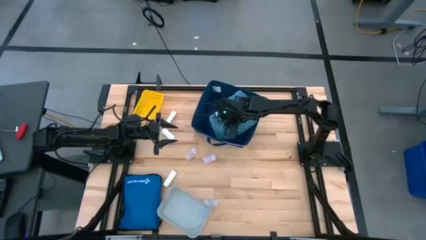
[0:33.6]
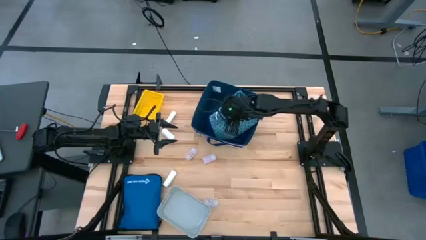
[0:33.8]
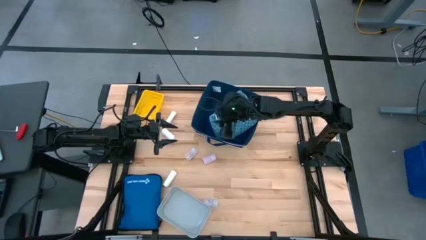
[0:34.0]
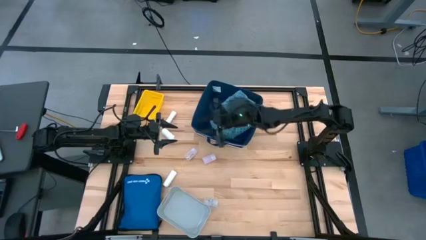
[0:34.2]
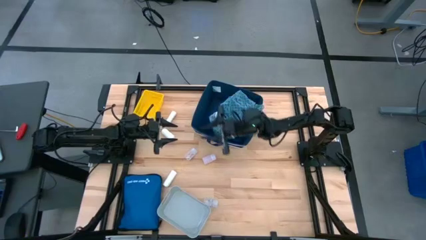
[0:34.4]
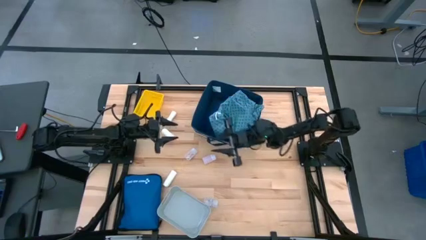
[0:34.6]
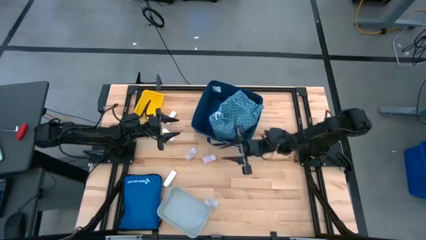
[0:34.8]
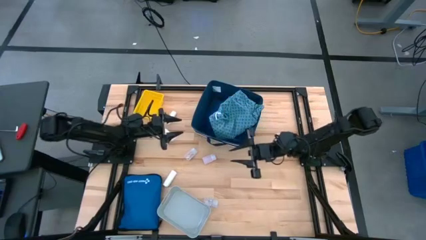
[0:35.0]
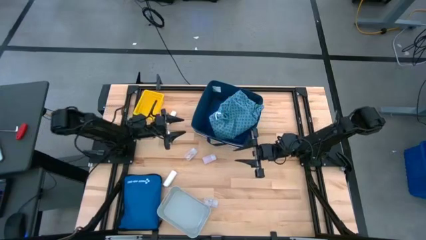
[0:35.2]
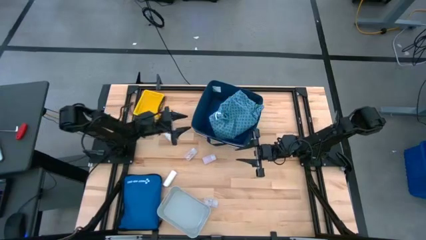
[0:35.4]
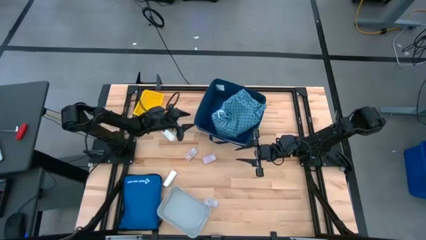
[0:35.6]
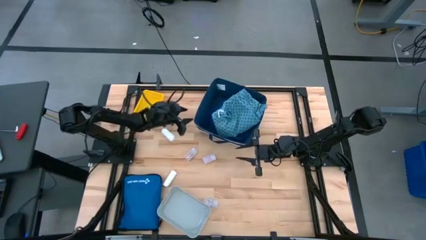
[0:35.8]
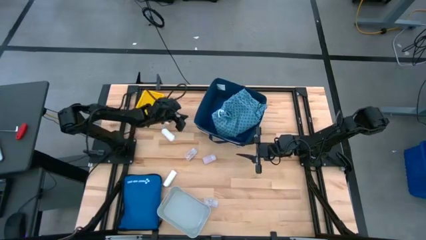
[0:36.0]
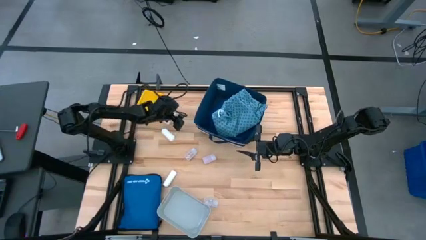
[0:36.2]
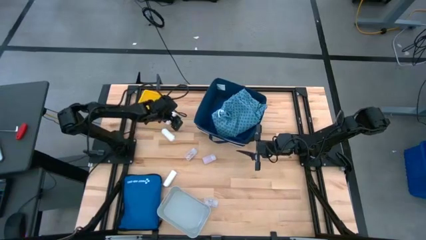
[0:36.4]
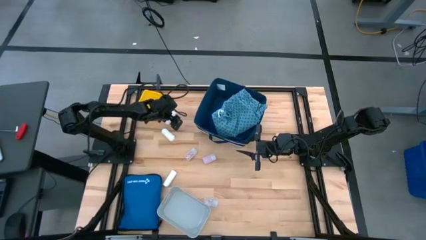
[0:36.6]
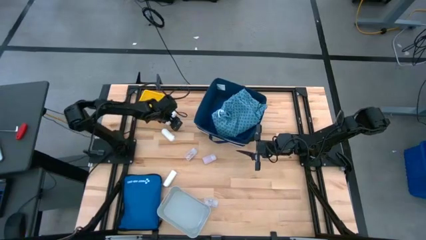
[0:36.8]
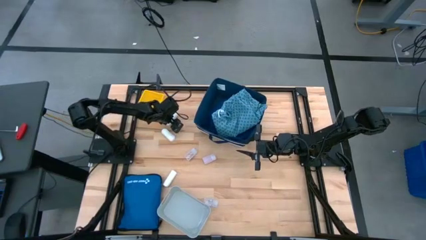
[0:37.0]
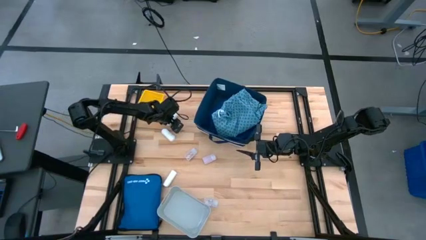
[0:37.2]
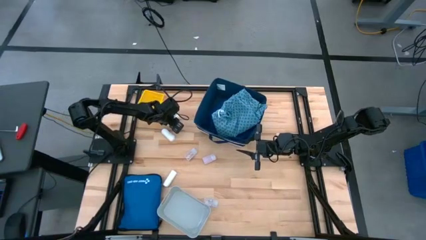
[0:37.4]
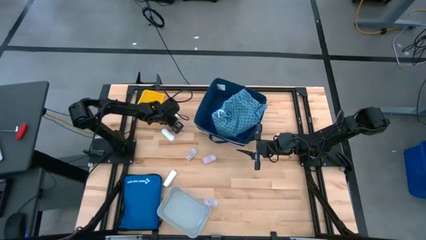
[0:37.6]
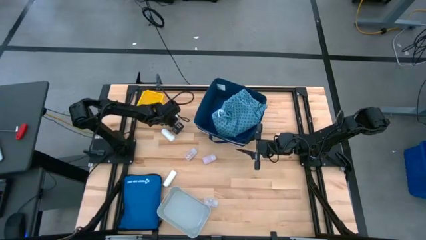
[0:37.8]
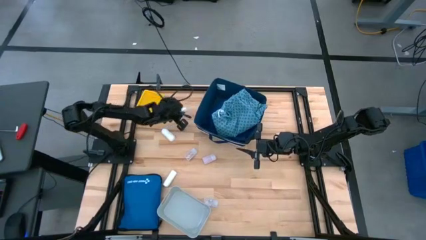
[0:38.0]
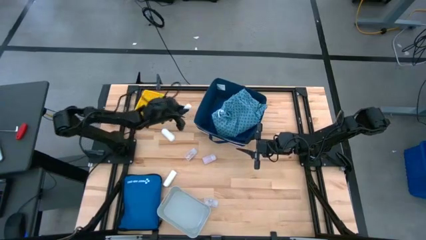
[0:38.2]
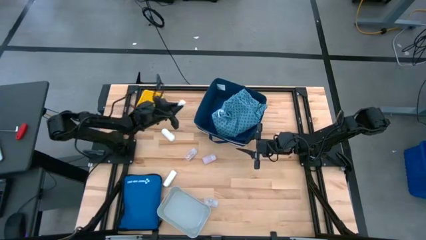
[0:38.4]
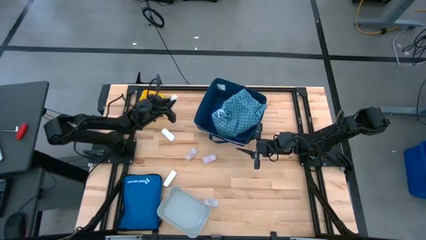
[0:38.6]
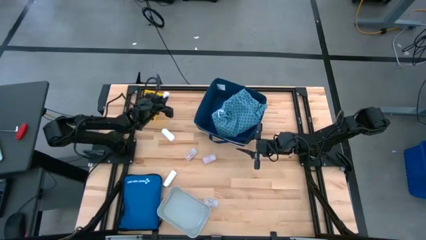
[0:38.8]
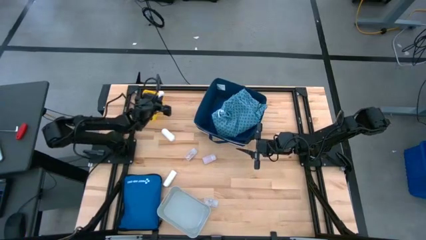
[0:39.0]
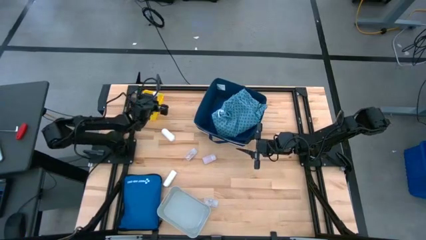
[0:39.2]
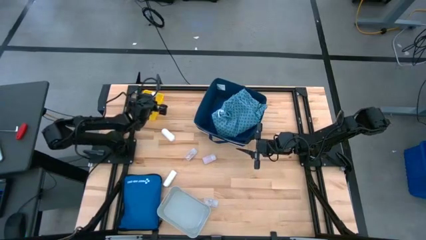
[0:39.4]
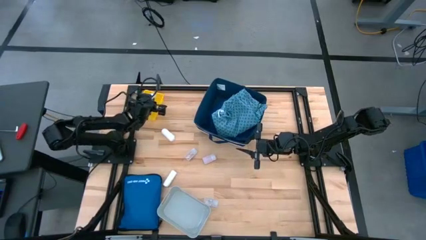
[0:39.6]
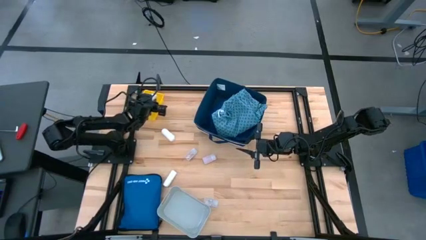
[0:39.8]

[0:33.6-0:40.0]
Task: Pick & place medical supplies in basket/bin
Put the top white rolled gauze into the yellow bin

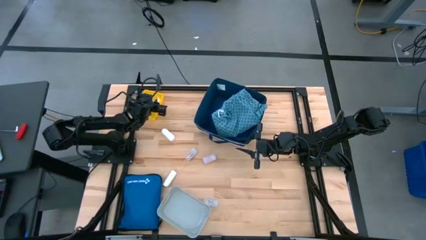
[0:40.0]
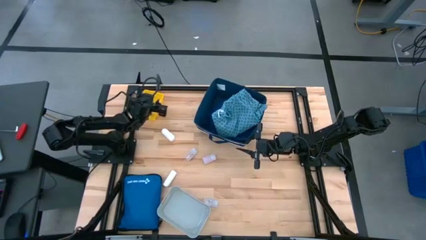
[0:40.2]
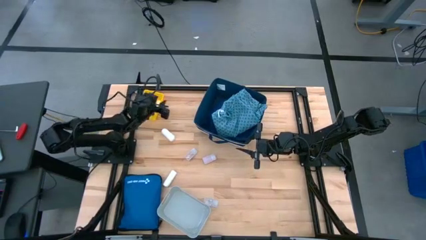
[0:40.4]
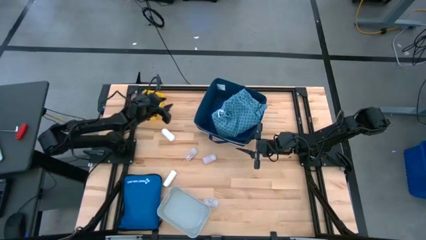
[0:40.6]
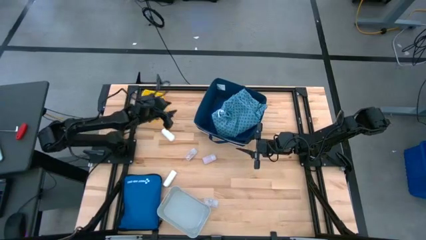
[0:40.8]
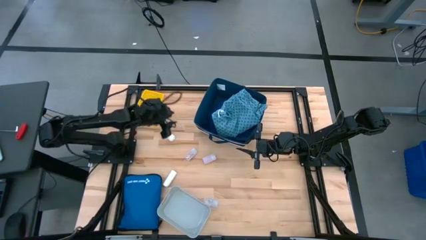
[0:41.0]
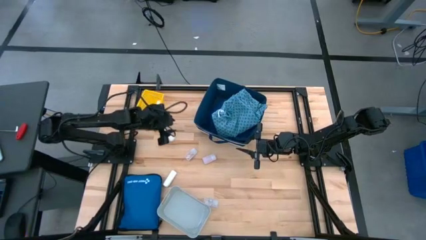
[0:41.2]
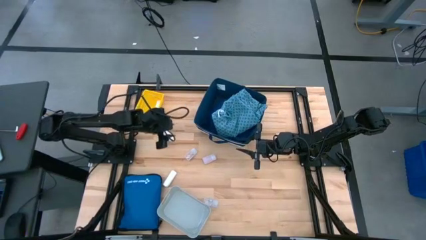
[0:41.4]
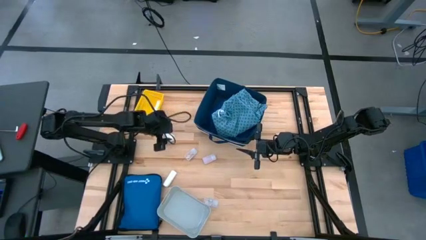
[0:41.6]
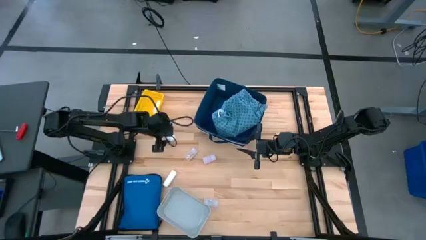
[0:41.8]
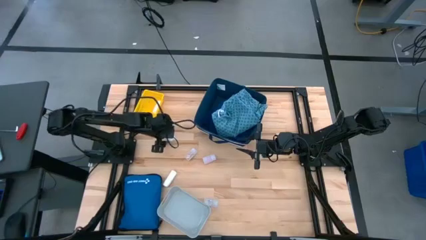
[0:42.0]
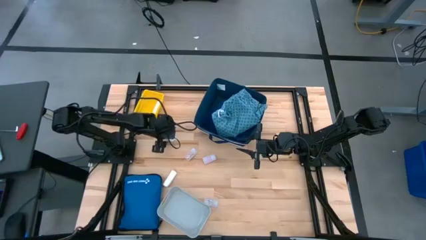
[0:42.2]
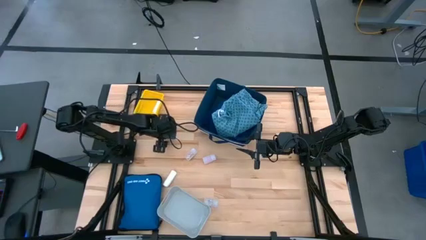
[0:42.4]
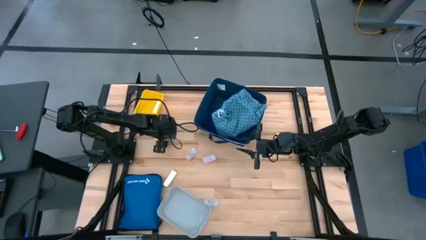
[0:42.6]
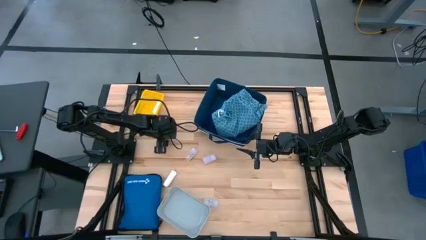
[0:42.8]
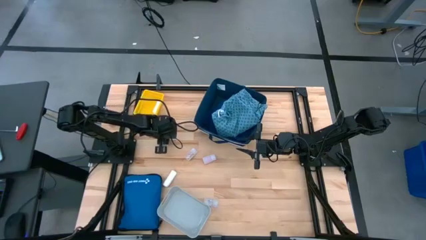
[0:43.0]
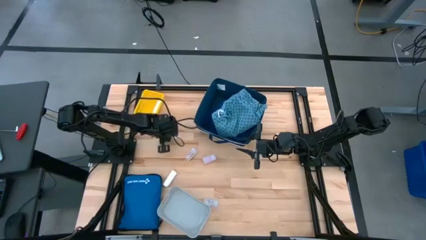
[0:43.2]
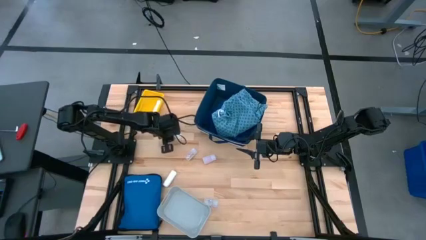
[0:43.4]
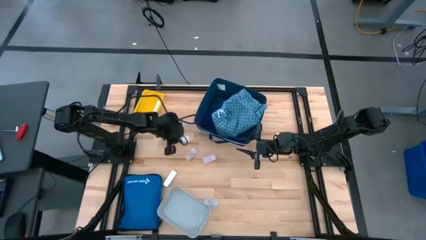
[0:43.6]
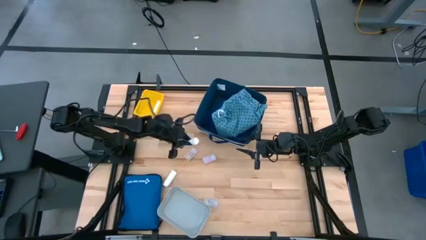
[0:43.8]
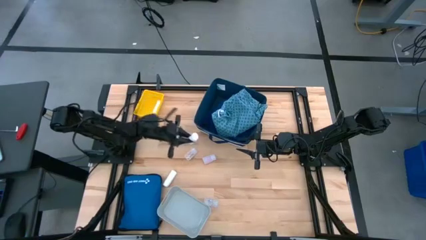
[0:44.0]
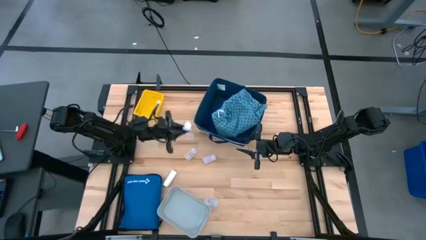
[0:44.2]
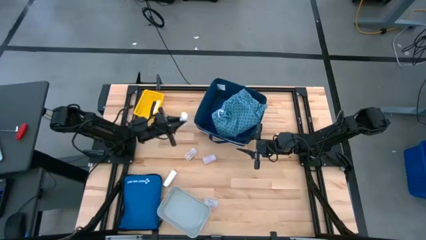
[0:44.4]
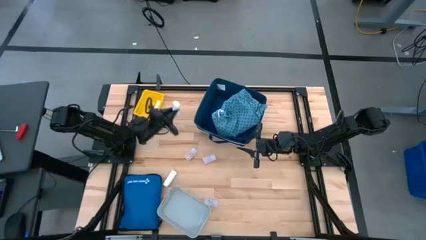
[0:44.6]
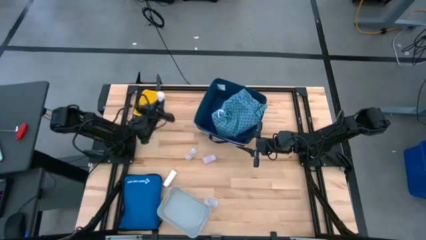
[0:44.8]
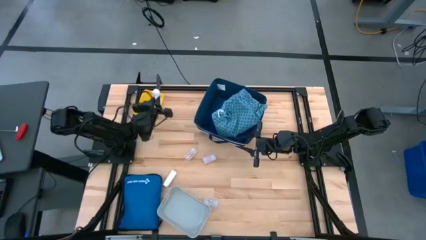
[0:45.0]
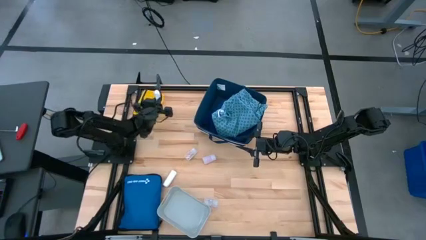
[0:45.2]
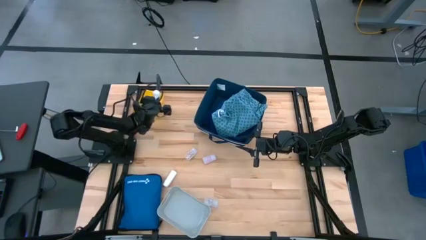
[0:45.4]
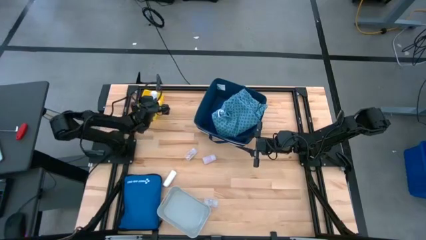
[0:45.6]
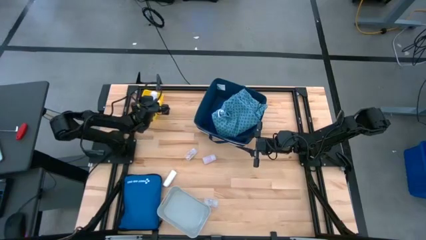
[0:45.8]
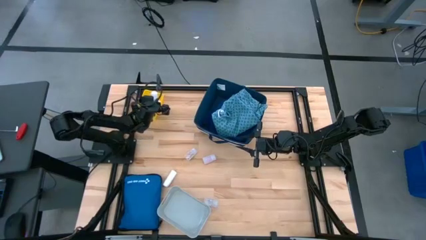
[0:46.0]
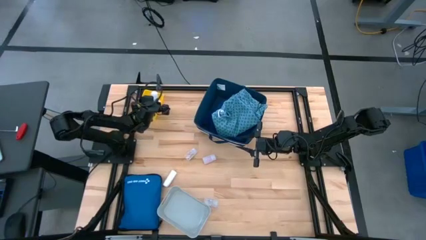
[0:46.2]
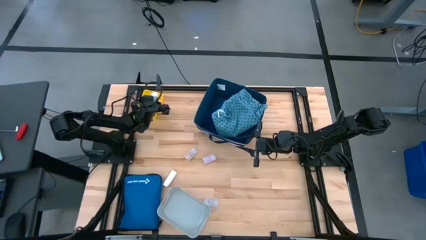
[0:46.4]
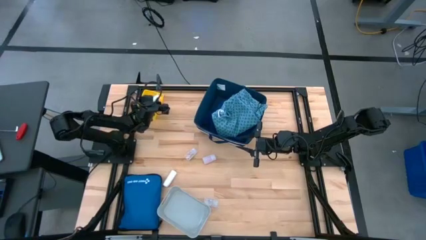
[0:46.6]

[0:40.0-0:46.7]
Put the top white rolled gauze into the yellow bin

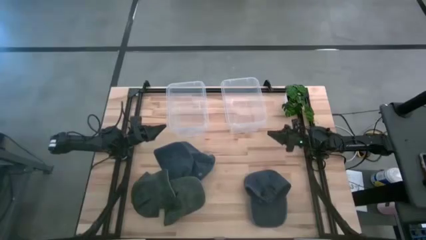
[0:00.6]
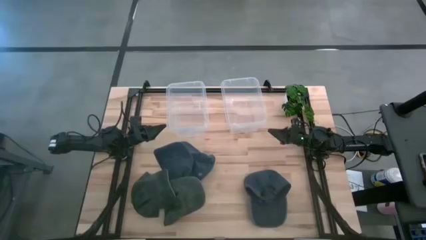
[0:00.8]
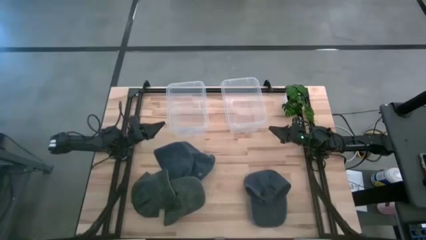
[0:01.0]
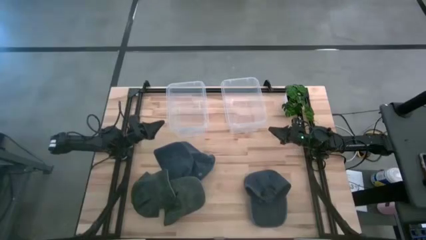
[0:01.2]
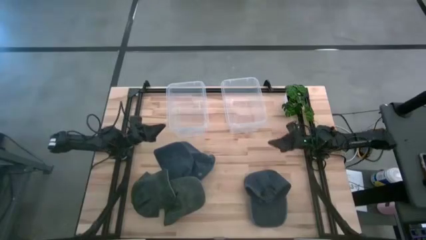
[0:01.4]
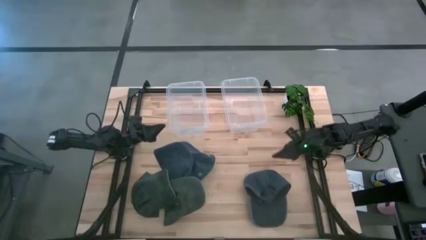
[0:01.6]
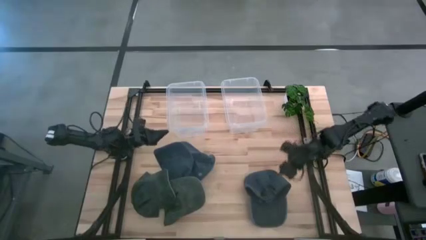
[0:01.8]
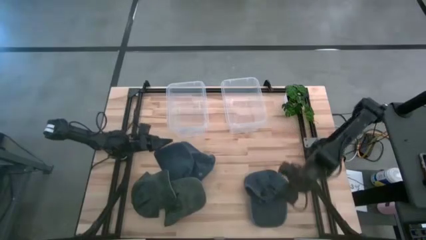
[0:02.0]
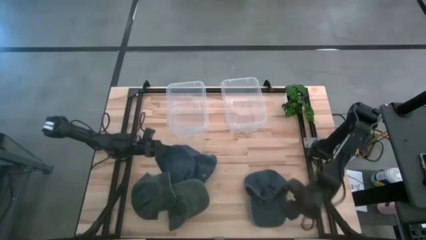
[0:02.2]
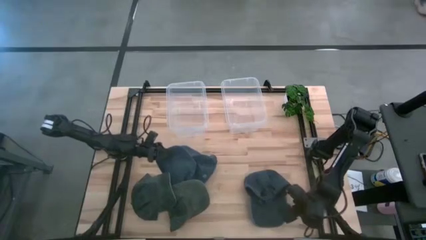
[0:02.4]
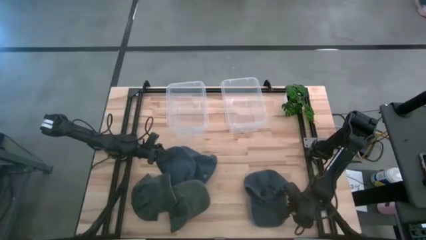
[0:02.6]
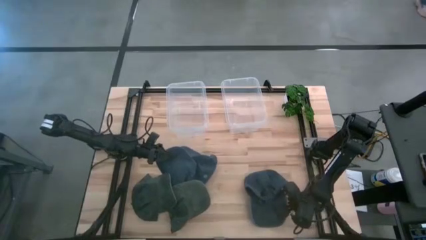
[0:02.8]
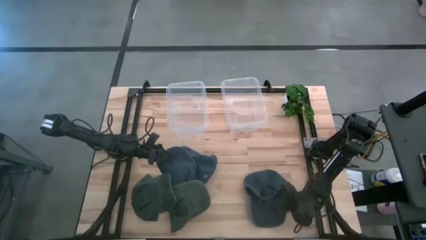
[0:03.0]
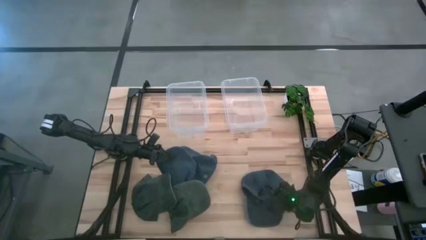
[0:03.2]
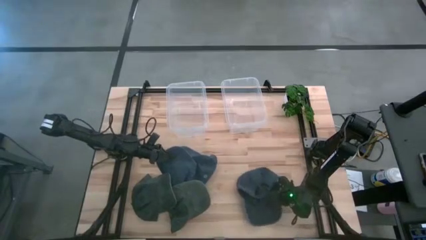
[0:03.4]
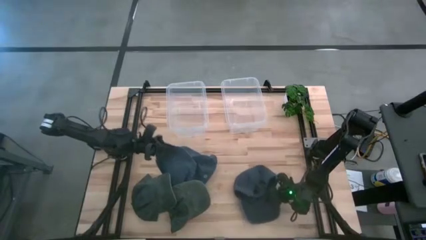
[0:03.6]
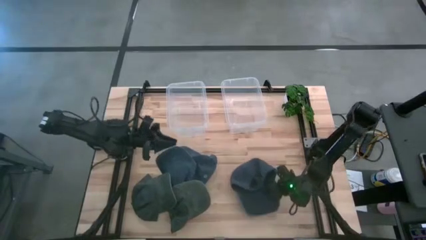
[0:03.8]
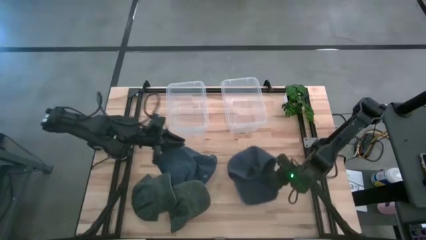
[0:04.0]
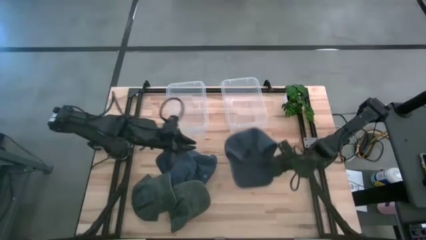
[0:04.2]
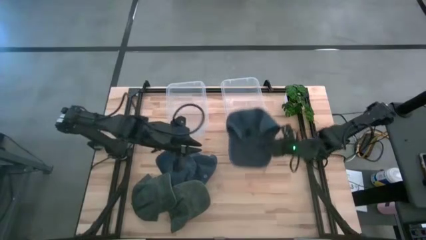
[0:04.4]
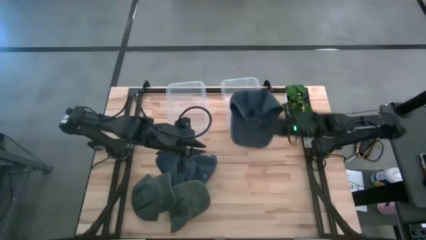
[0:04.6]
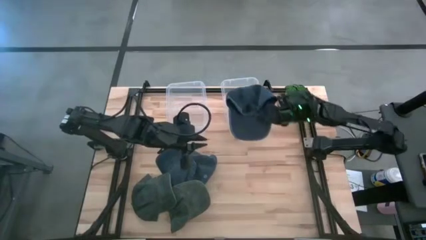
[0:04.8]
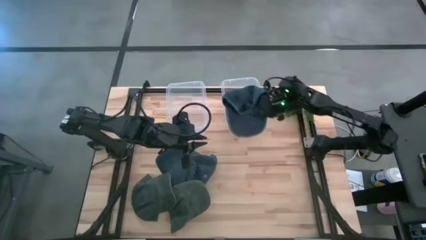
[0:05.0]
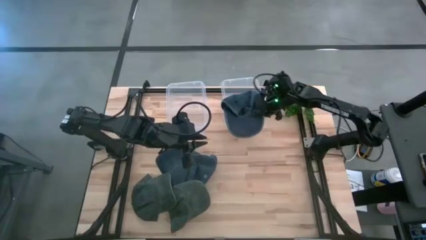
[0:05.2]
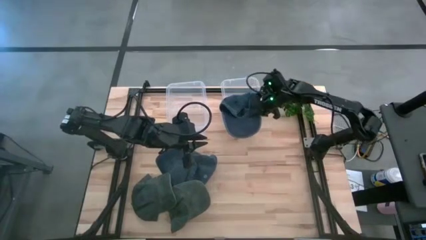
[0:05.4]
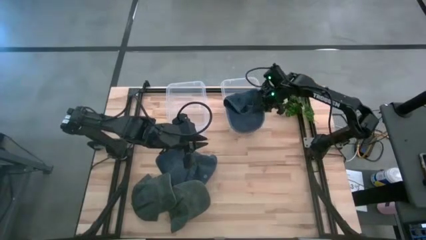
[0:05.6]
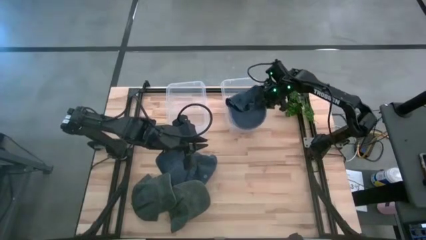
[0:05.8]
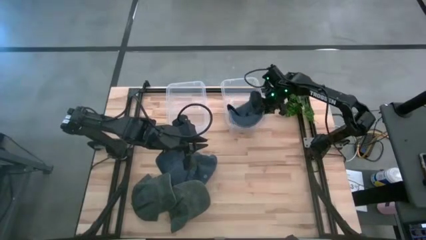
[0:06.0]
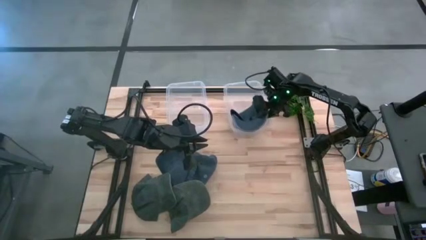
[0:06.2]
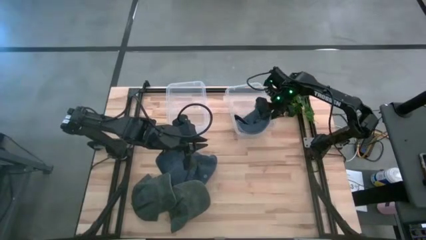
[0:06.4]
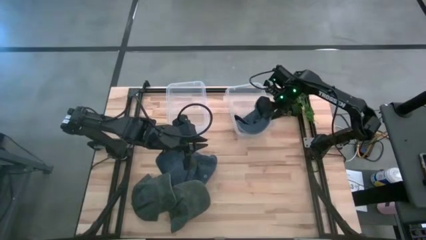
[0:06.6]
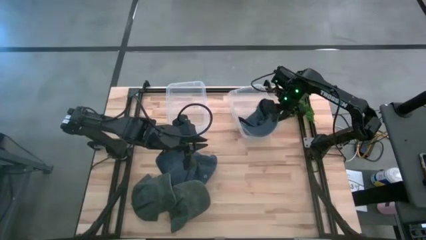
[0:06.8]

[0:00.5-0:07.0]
Task: Pick & Place hat
Put the bottom right blue cap into the right transparent bin
